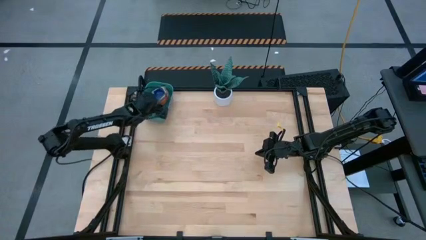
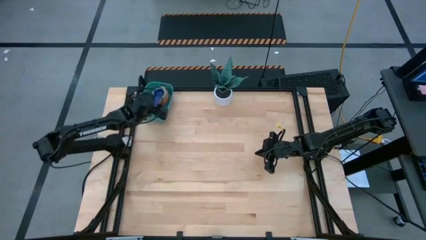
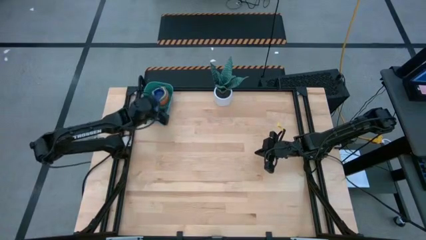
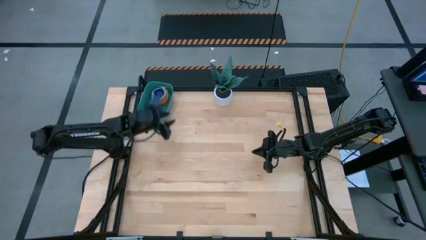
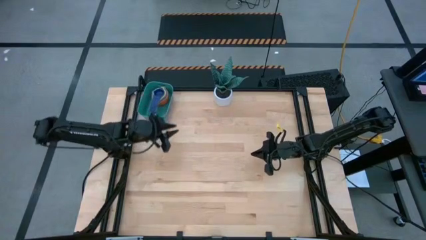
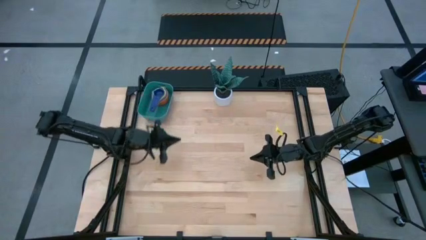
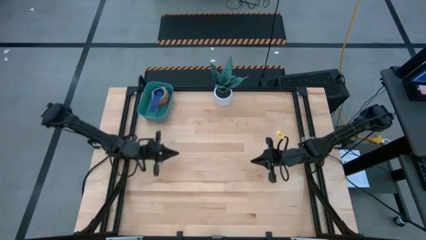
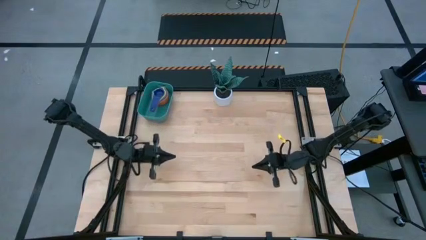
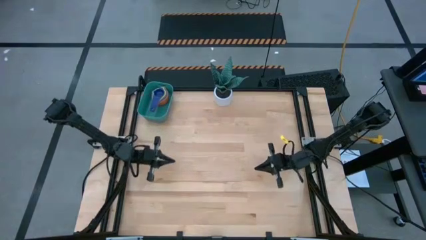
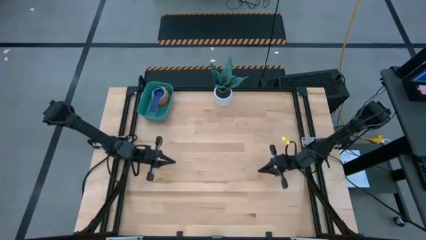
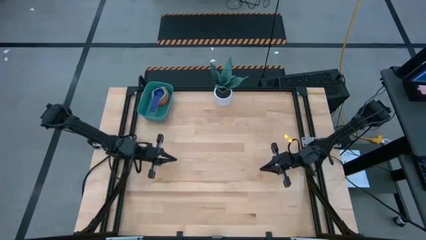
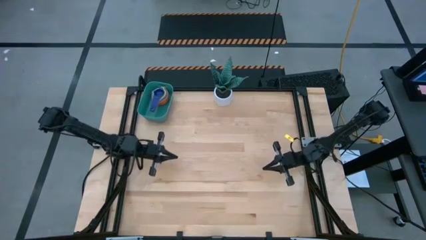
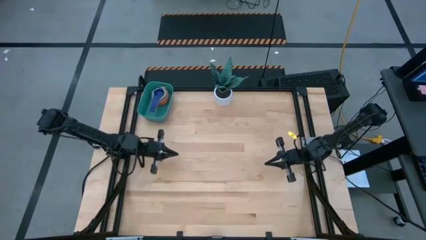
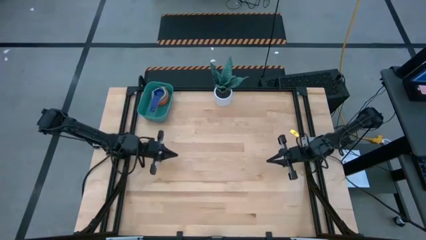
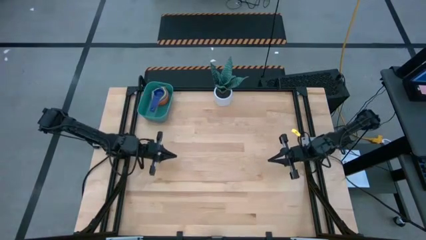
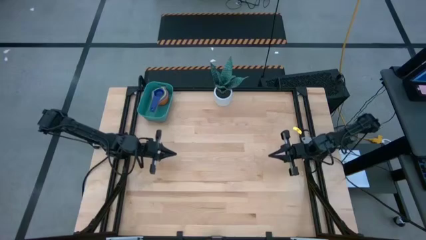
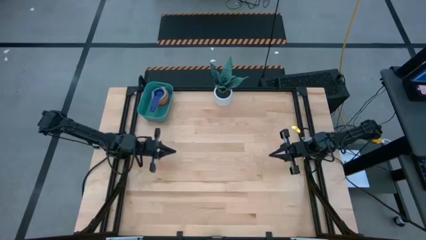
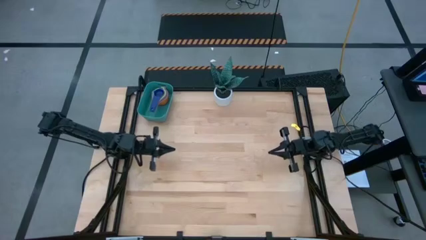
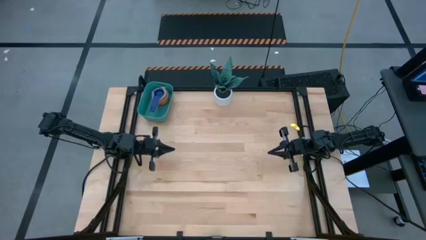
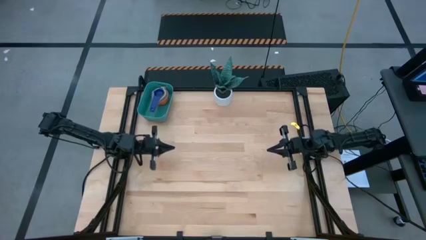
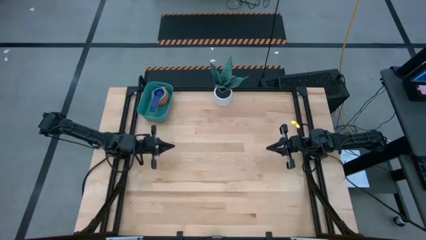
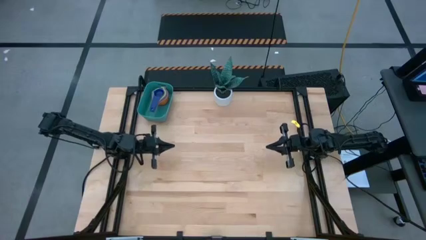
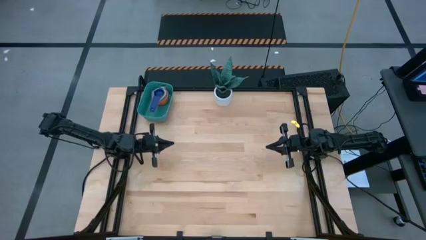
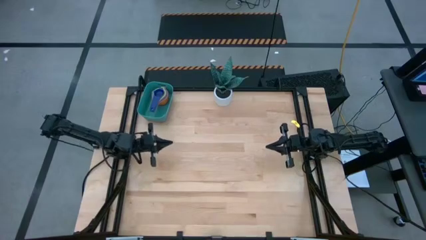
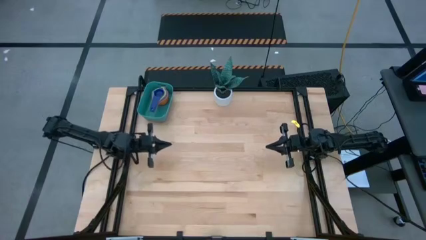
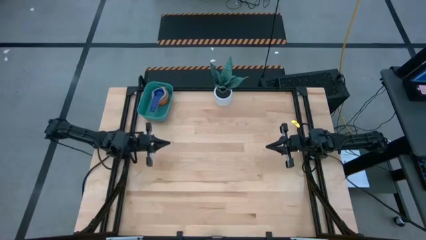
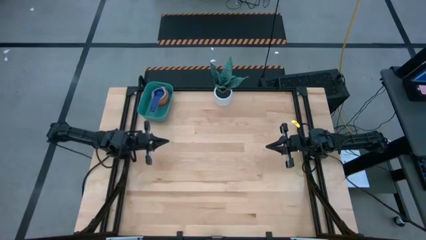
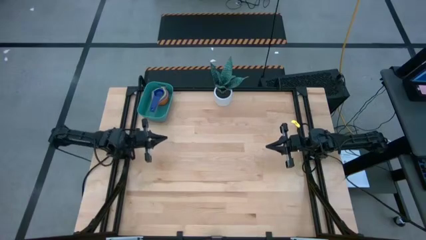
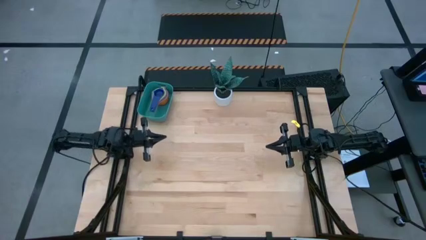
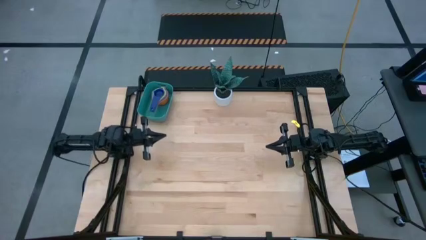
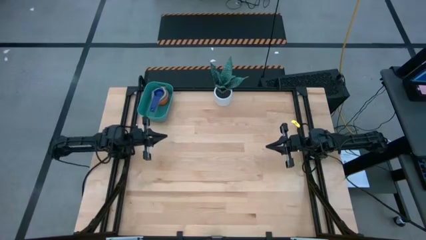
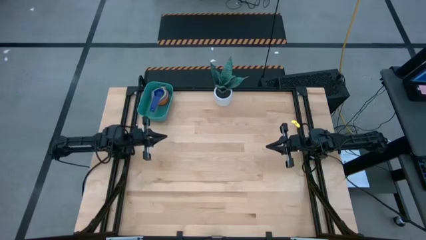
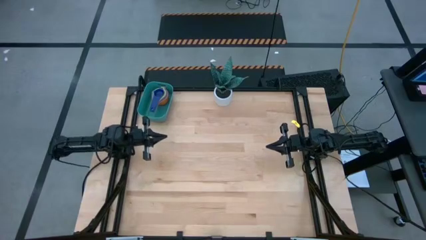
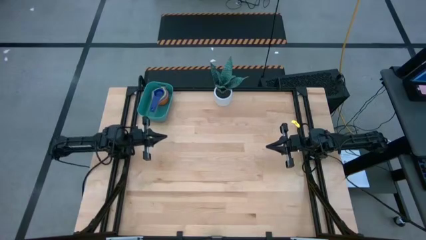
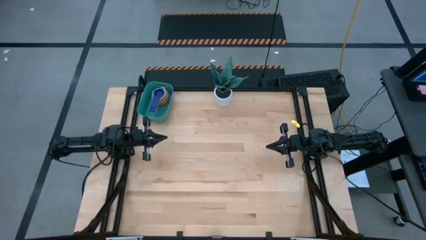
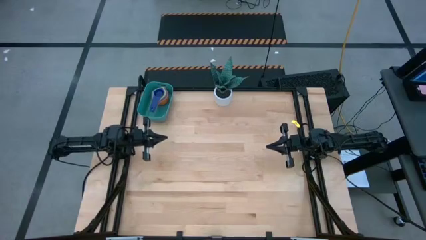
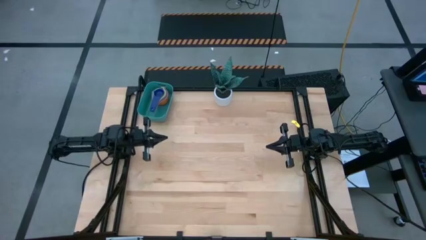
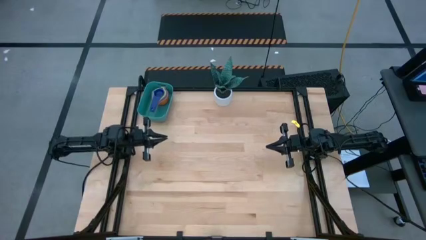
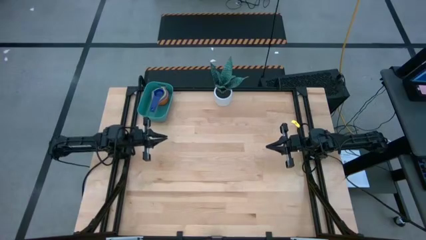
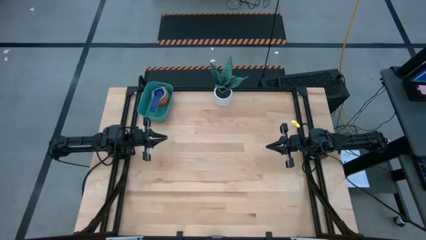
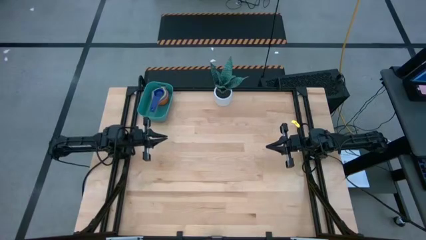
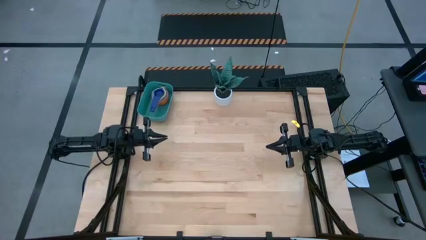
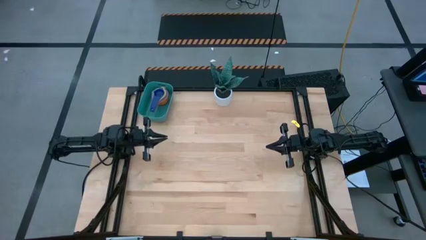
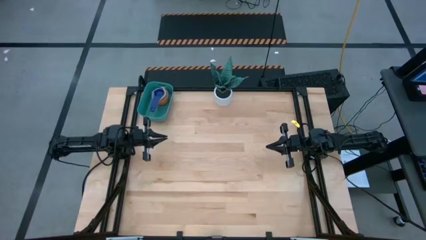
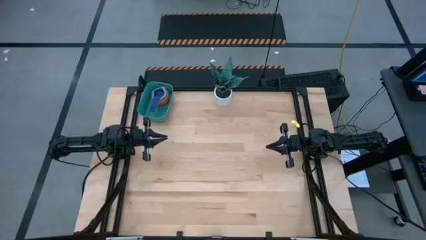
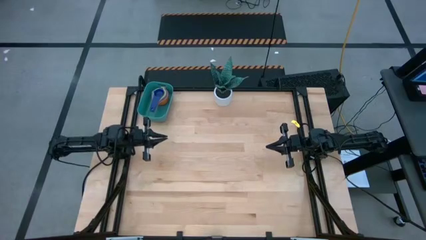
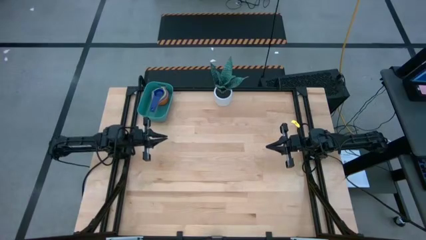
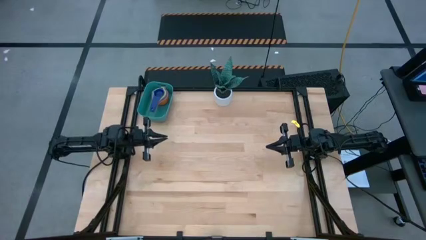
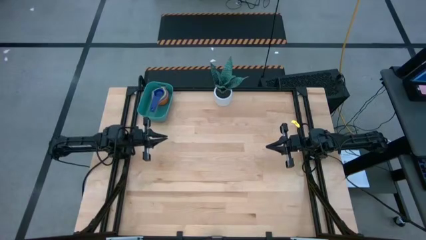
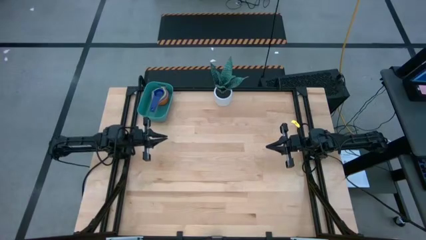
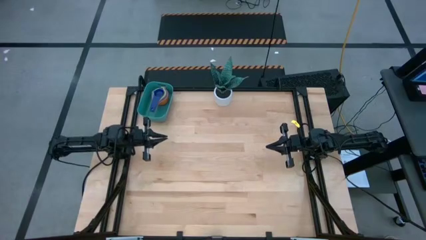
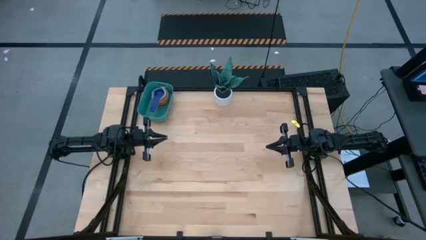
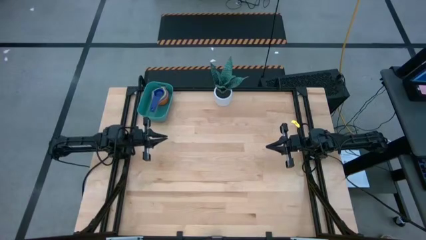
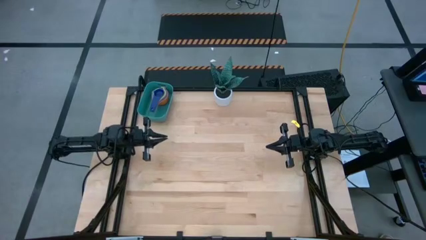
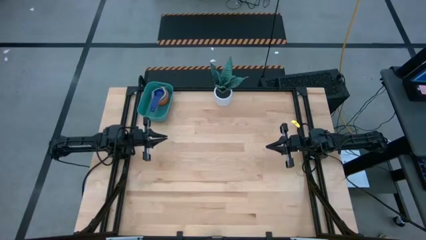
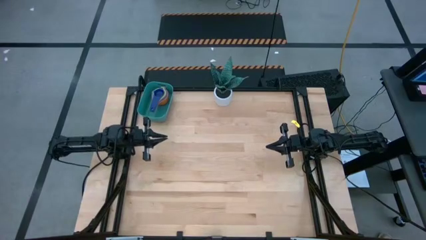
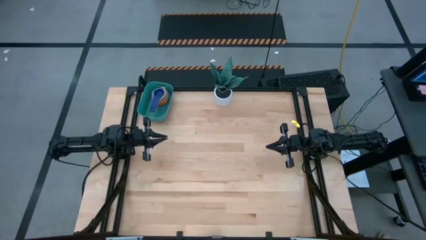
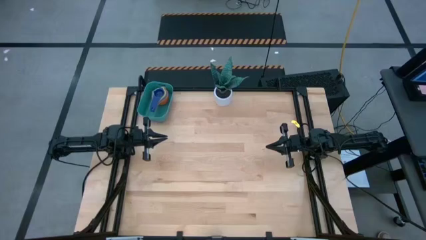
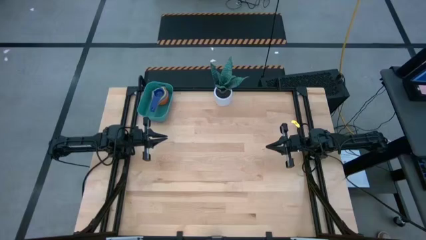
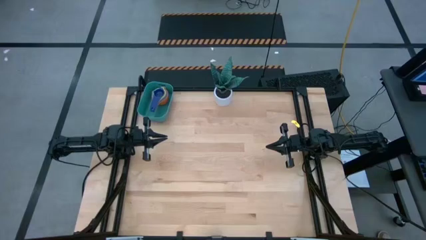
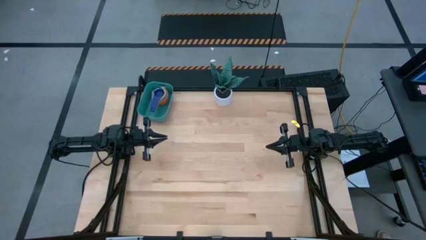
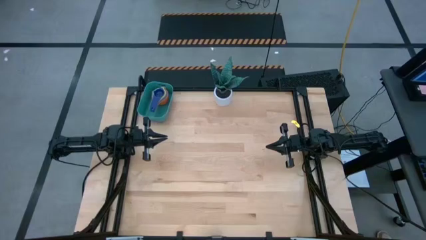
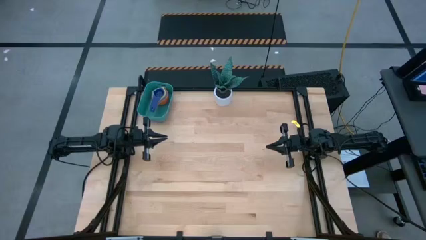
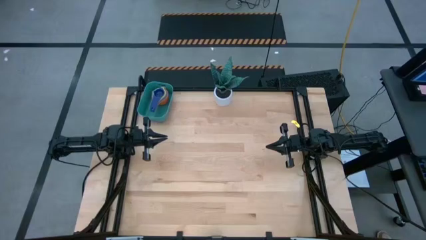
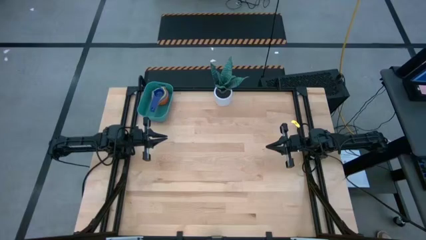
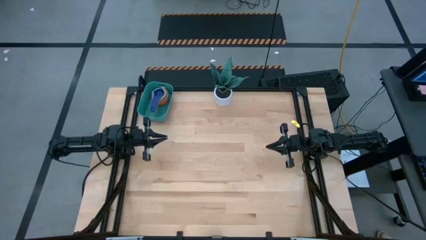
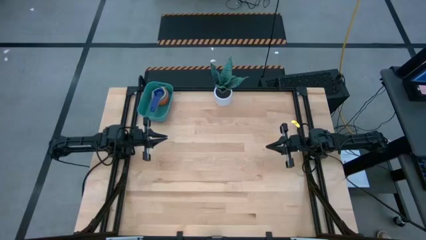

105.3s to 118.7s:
Task: Nest measuring cups in basket
Return to Home Position

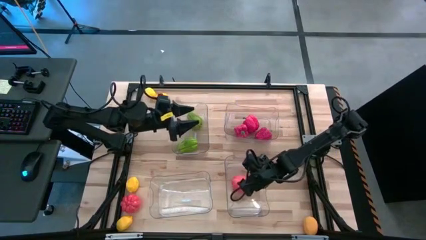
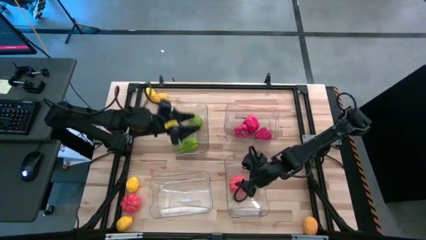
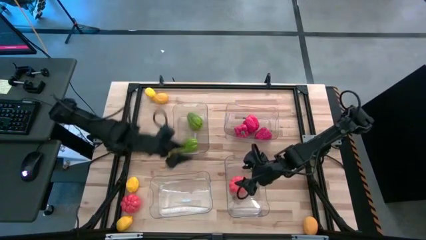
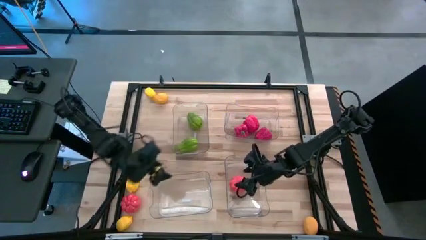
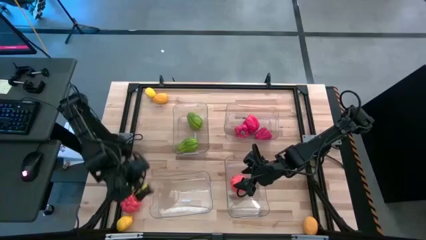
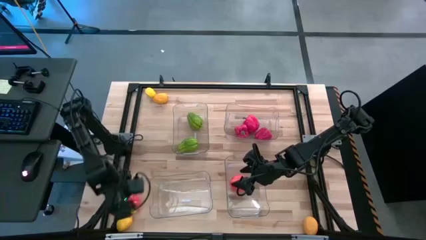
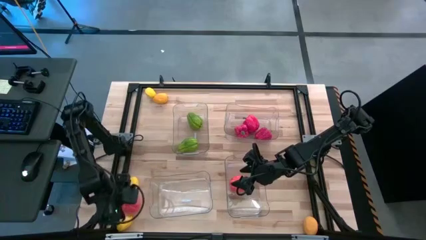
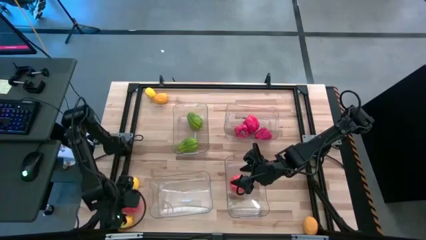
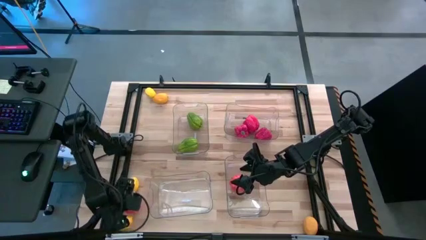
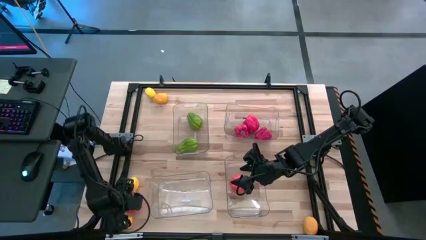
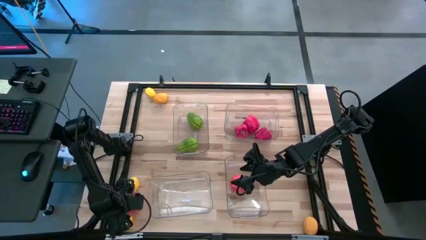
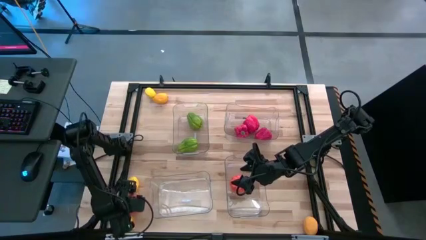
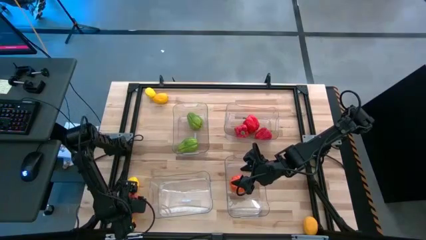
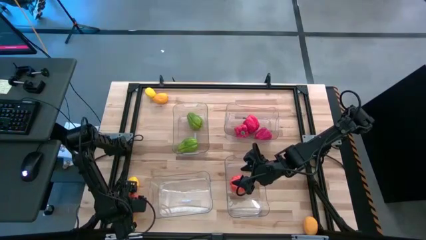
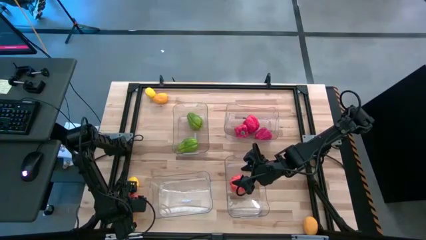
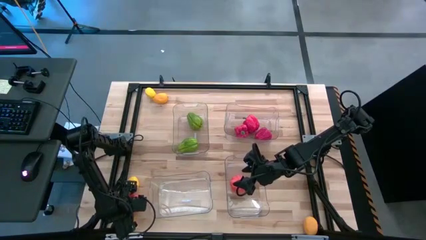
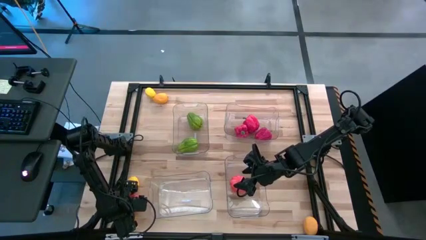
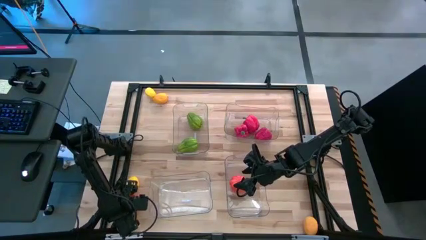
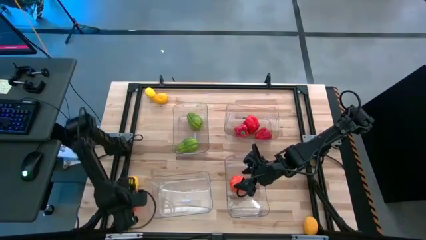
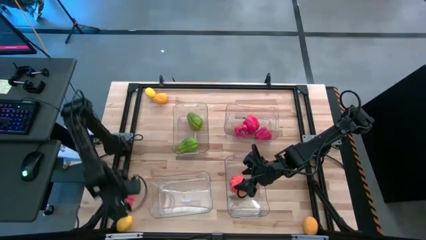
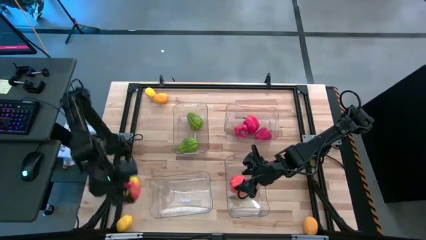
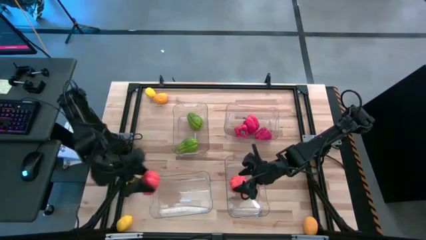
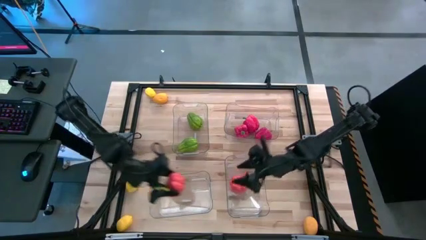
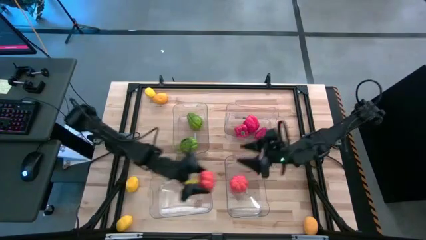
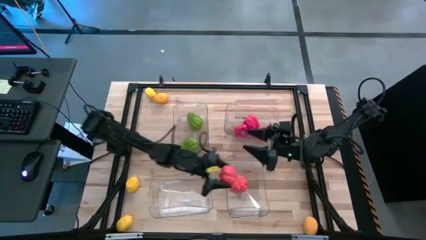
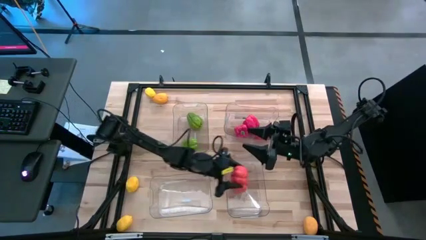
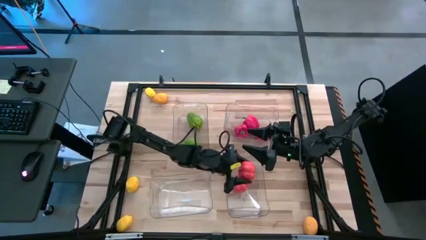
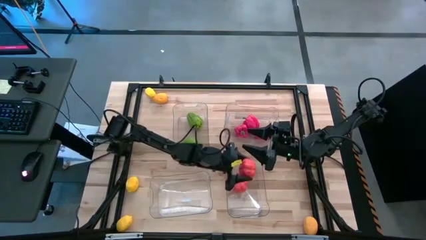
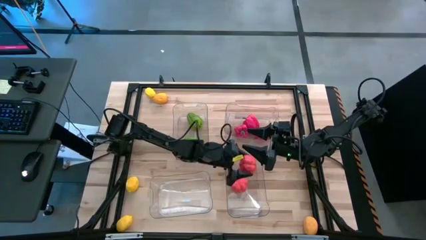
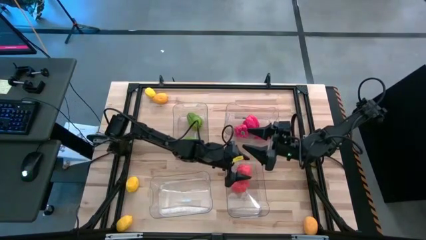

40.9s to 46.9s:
Task: Sort produce into baskets
Put the orange pumpkin into the bottom right transparent bin
